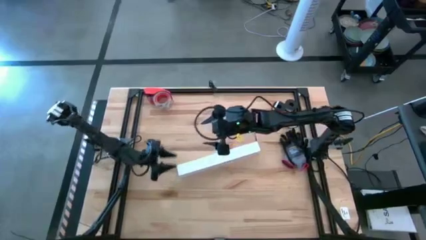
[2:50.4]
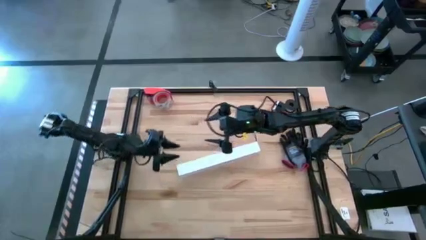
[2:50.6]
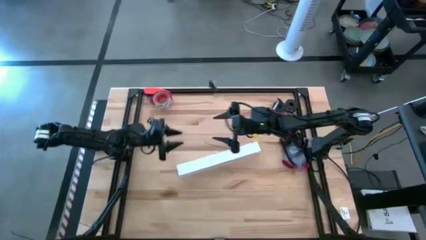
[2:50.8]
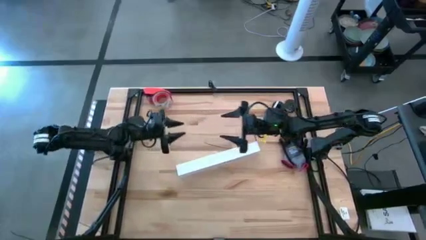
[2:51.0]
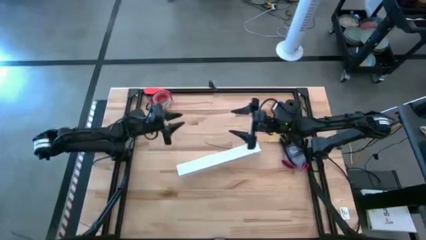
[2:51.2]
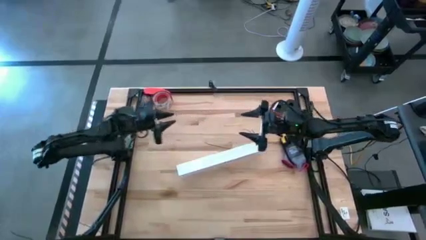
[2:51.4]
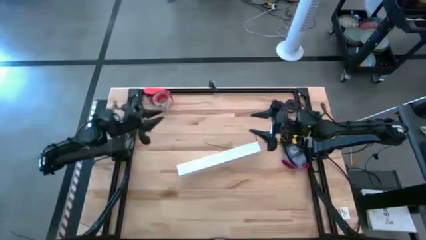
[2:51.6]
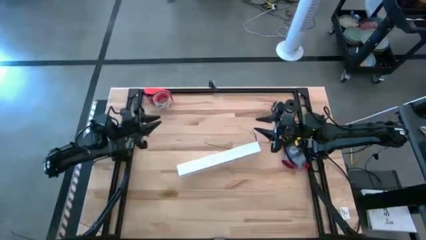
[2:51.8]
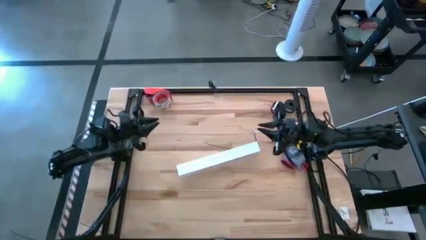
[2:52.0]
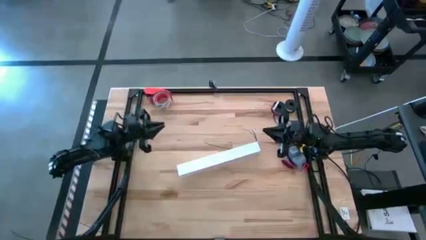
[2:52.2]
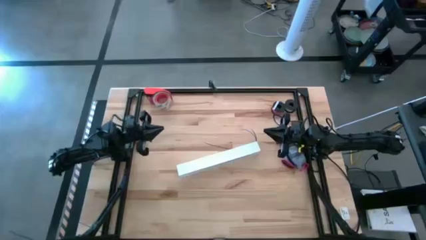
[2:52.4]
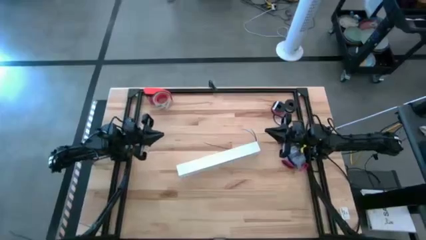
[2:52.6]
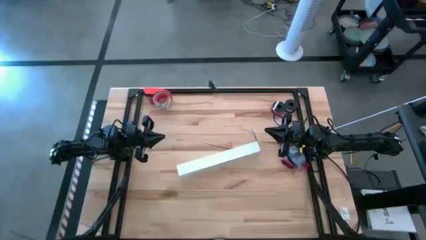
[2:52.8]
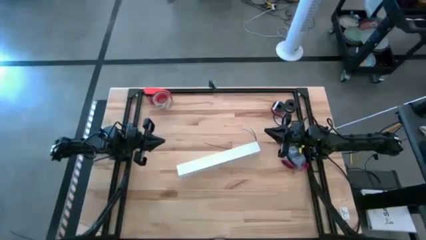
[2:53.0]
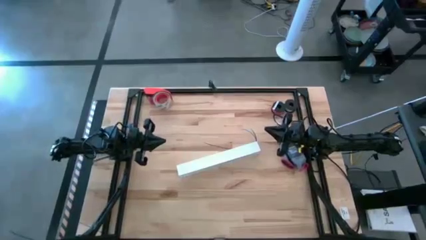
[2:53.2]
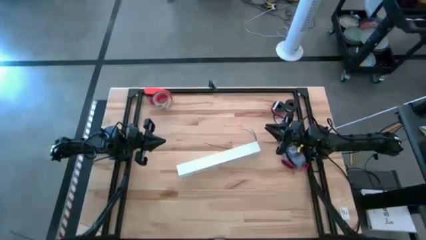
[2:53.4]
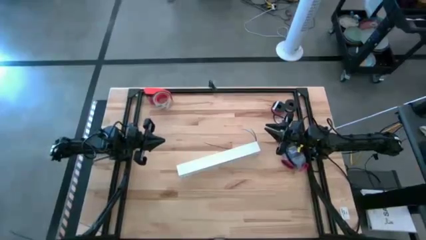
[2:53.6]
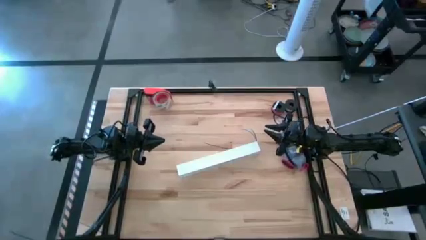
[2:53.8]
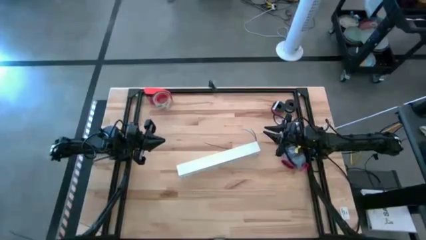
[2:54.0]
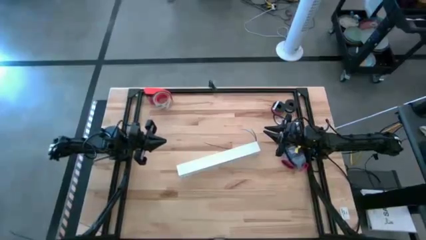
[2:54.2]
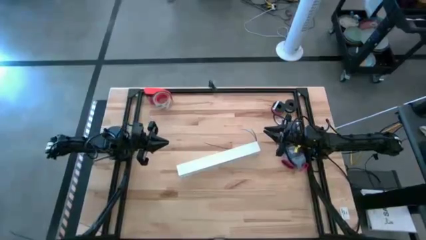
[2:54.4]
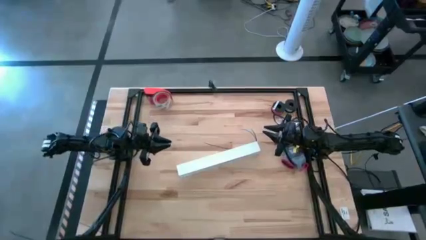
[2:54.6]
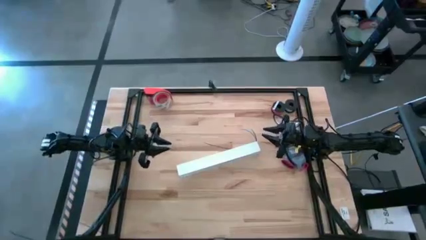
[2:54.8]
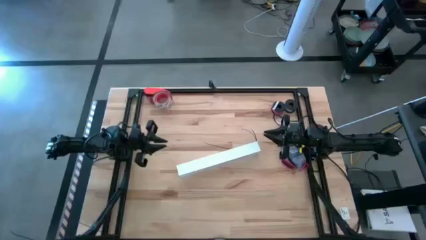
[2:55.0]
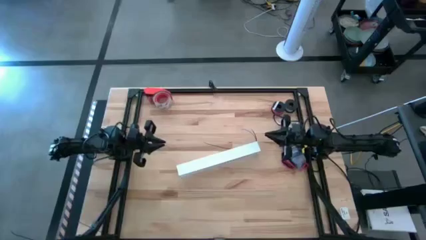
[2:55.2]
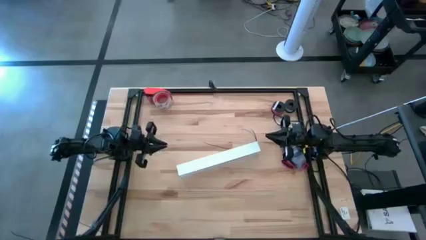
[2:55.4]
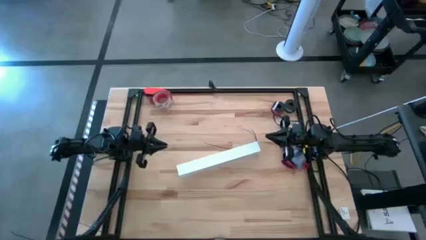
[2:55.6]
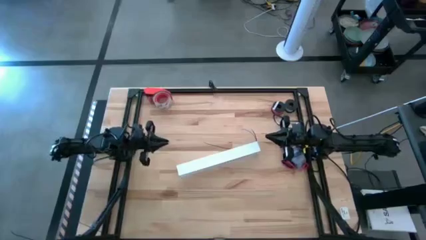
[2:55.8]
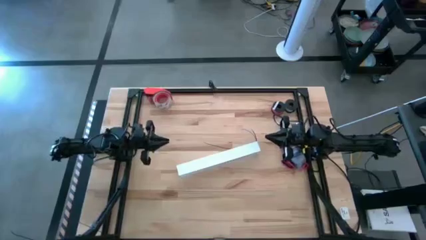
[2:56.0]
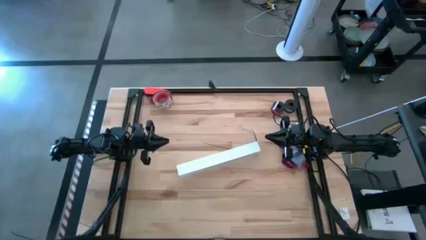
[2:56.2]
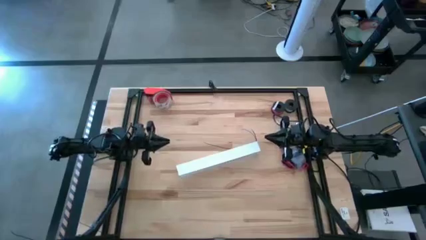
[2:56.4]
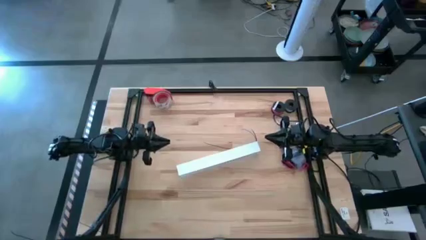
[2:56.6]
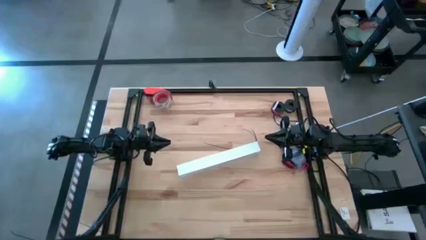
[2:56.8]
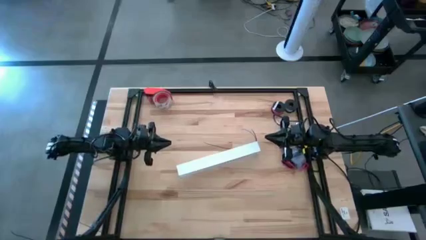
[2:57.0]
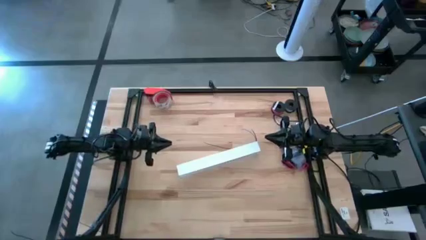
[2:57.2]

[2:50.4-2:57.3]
Task: Ziptie cables
Return to Home Position

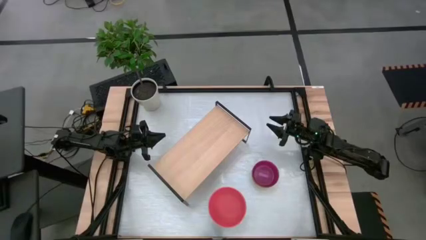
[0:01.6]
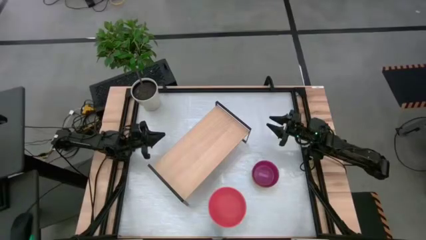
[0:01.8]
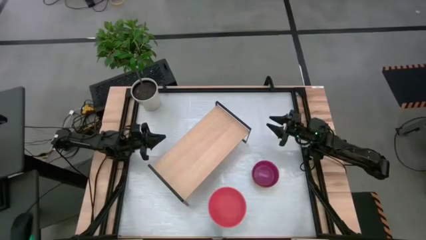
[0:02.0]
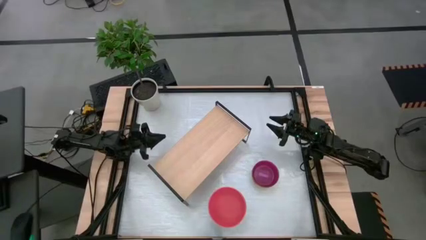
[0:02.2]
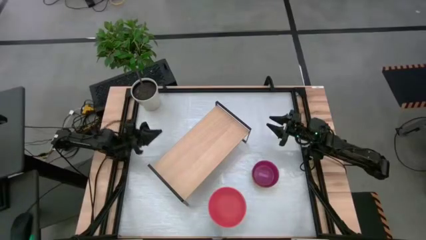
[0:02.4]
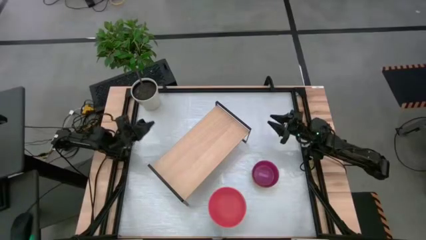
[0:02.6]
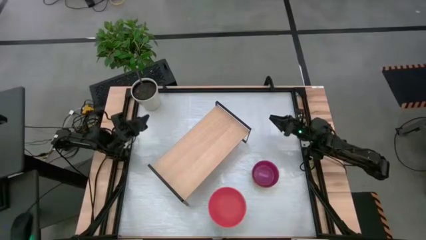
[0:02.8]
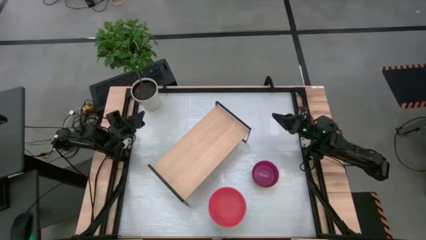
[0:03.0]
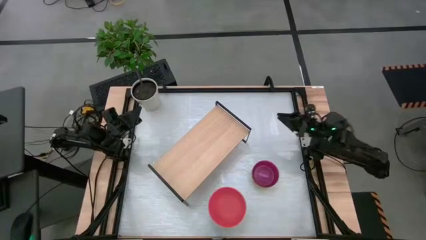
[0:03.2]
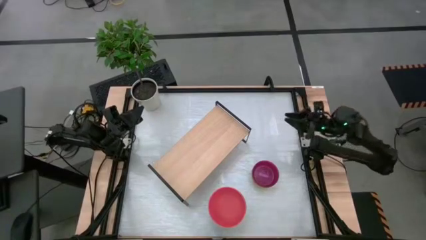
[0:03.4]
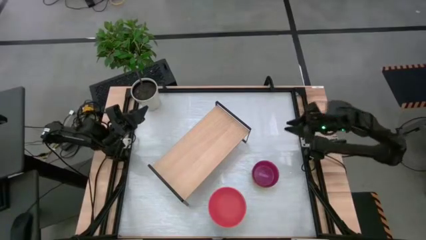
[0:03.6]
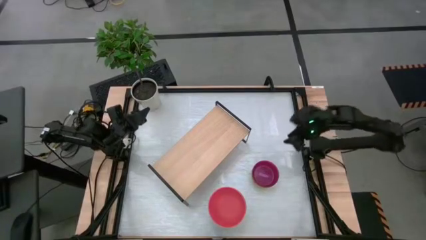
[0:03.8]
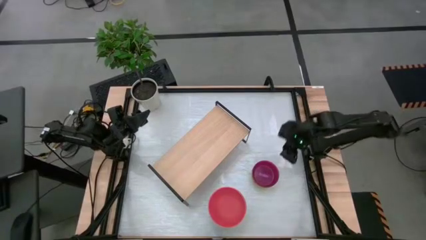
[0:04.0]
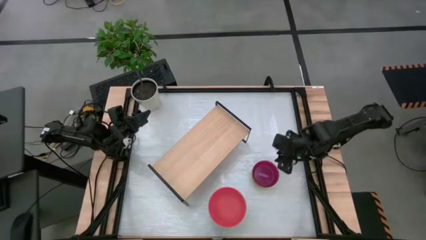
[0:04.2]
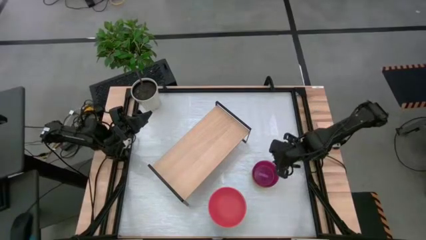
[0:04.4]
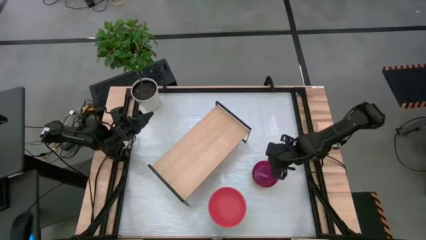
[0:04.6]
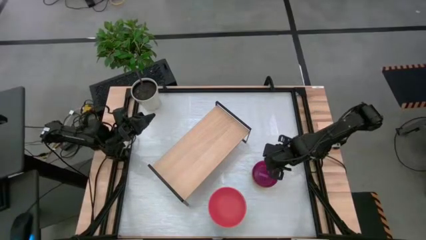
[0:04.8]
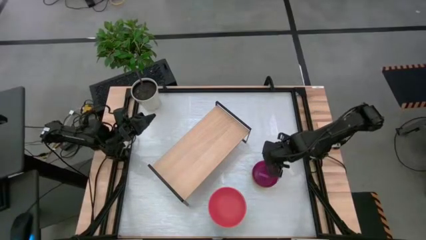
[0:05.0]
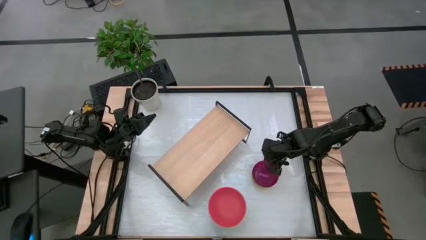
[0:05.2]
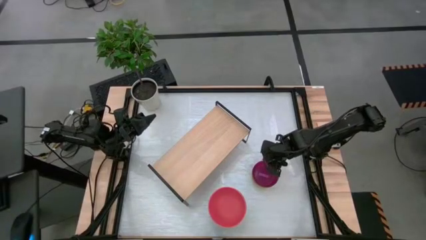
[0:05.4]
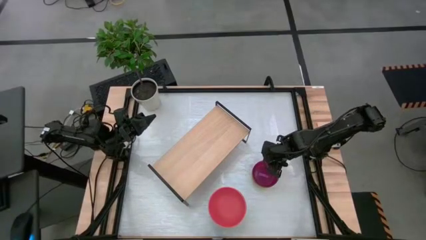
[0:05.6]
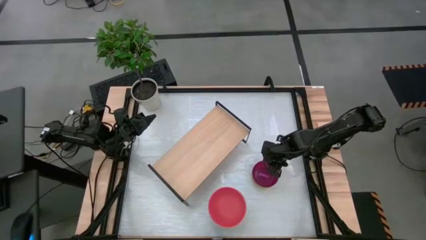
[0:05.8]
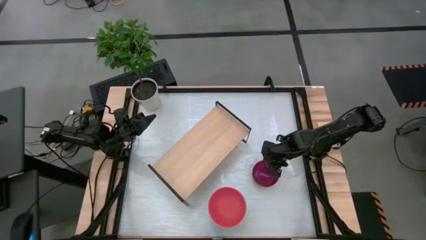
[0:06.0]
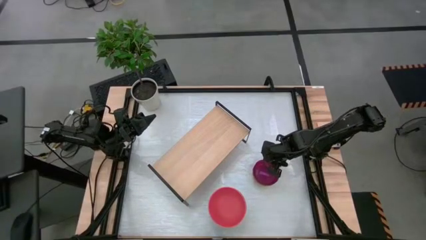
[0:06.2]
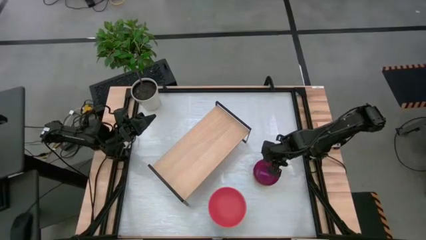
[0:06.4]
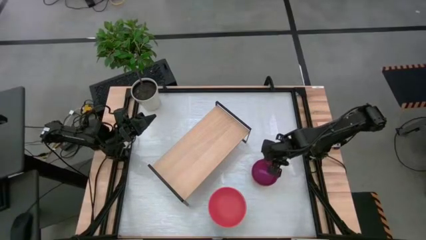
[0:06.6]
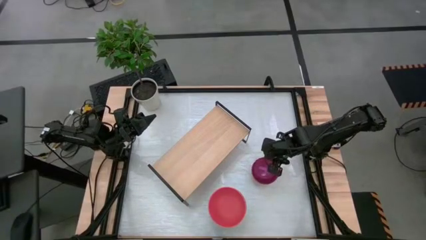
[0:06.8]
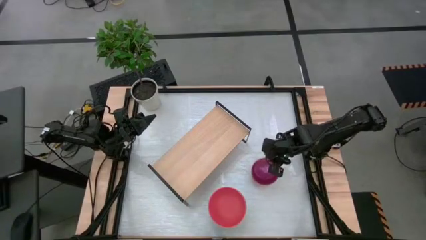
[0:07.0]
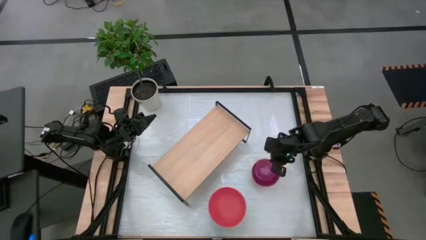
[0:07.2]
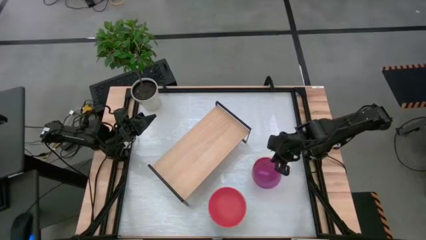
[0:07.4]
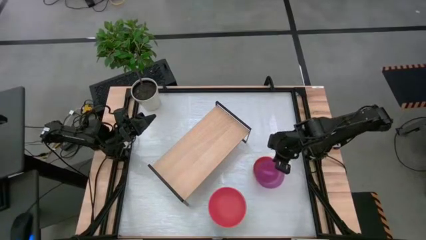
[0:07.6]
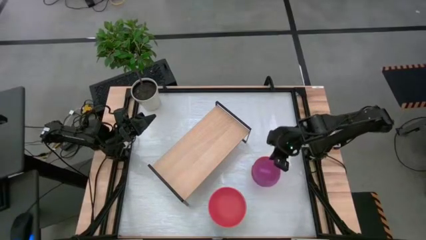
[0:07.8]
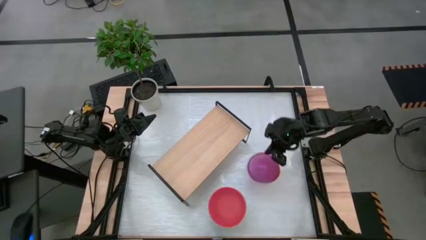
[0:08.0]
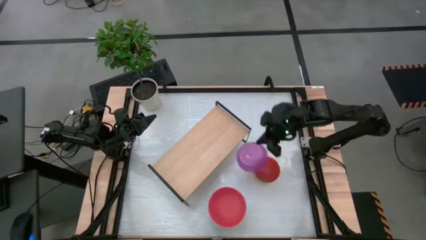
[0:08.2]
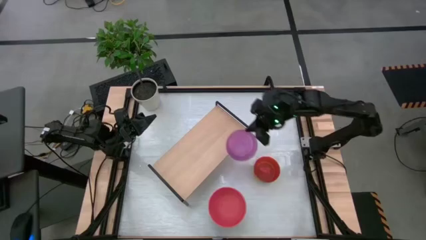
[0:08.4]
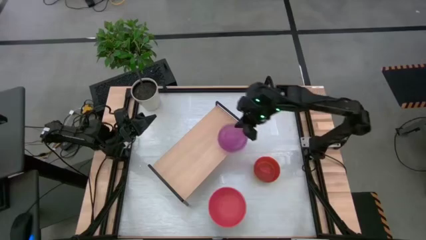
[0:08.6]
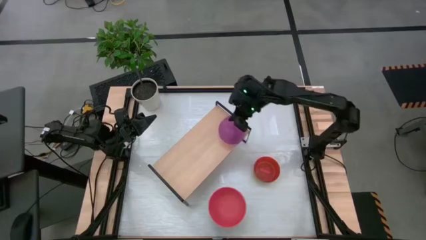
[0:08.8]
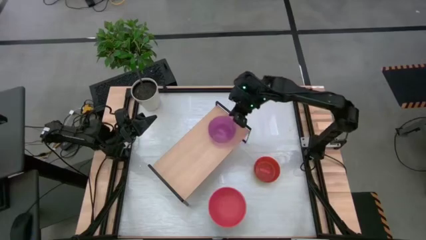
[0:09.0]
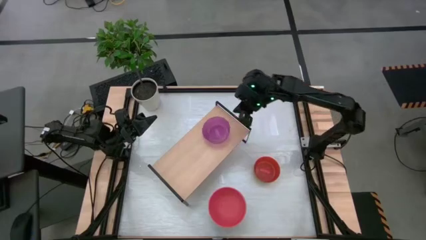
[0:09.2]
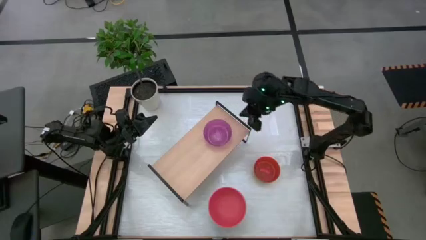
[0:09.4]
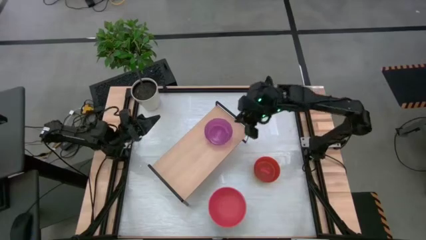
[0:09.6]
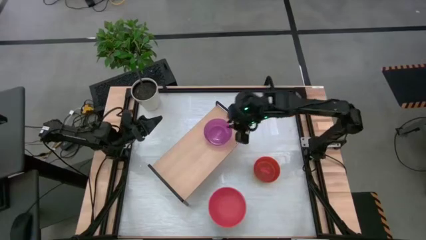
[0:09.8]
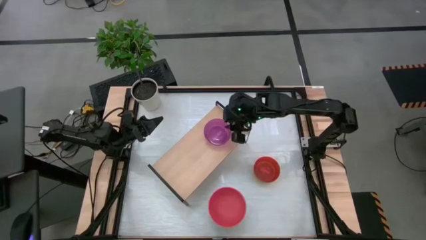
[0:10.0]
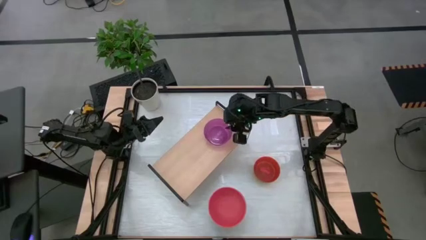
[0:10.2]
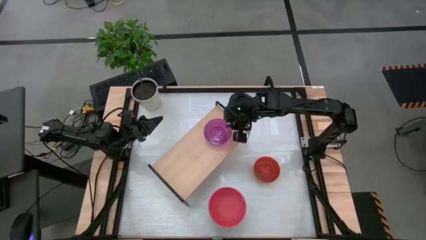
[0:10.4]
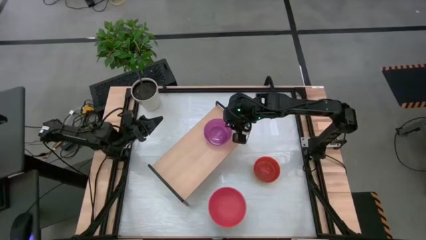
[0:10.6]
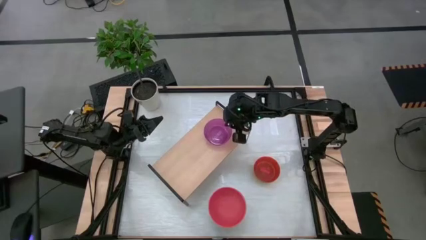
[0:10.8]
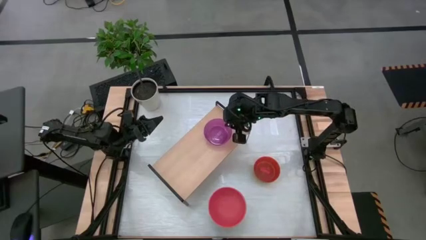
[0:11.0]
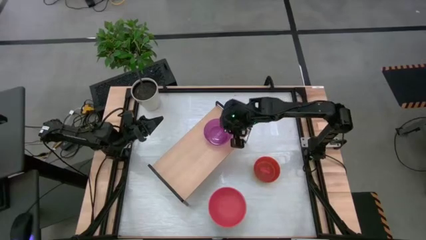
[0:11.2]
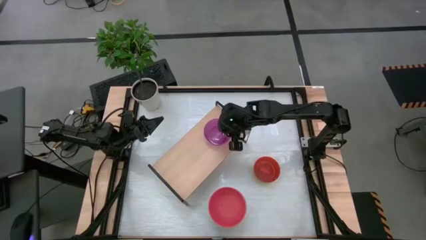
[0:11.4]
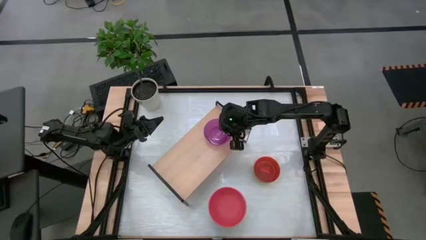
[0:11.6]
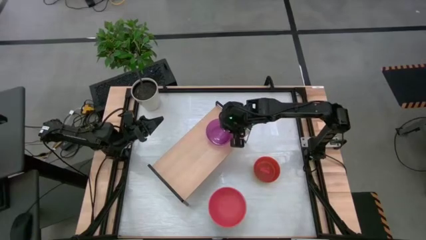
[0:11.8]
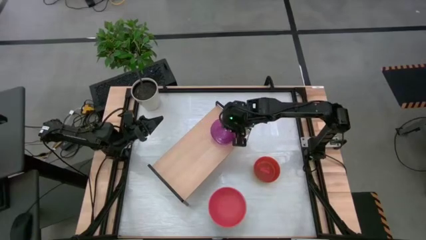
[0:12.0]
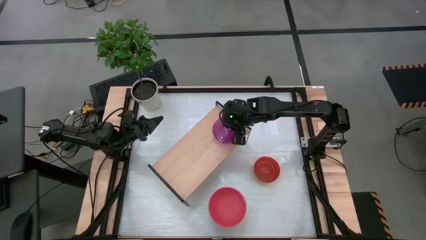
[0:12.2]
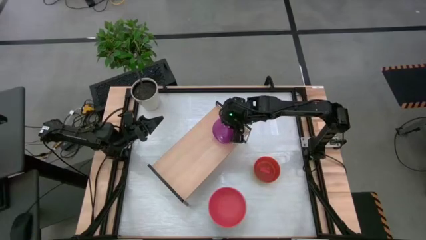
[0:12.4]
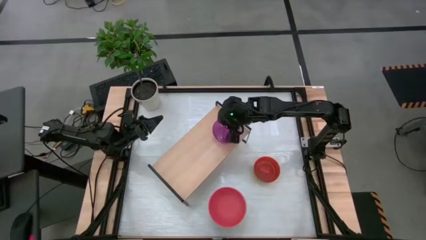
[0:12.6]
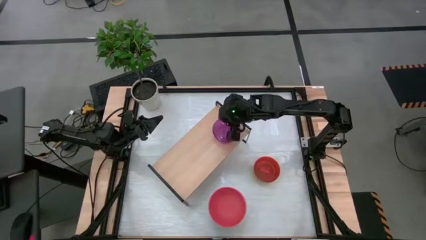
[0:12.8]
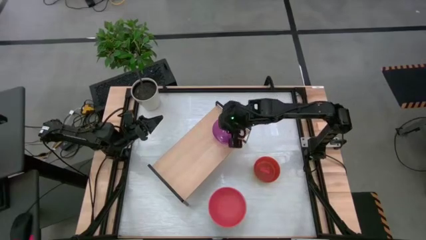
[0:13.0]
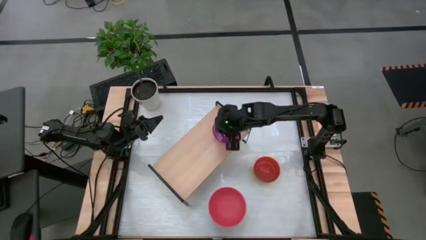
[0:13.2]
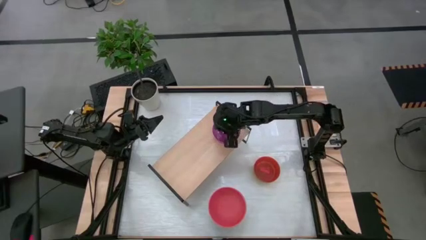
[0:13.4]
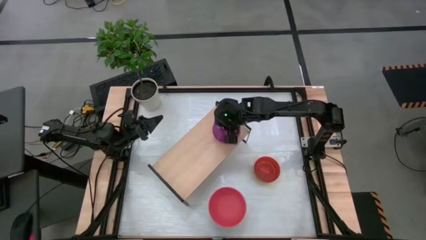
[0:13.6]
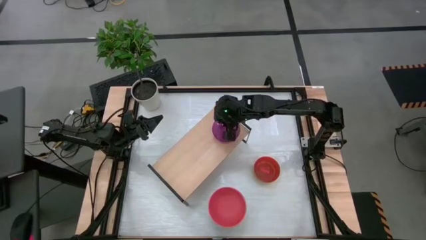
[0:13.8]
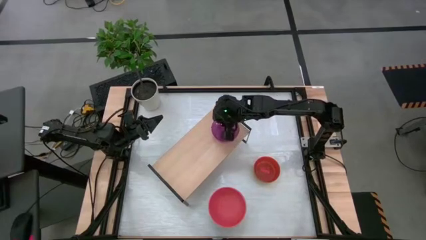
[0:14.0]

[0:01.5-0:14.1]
Task: Place and stack bowls onto a shelf
Put the violet bowl onto the shelf
